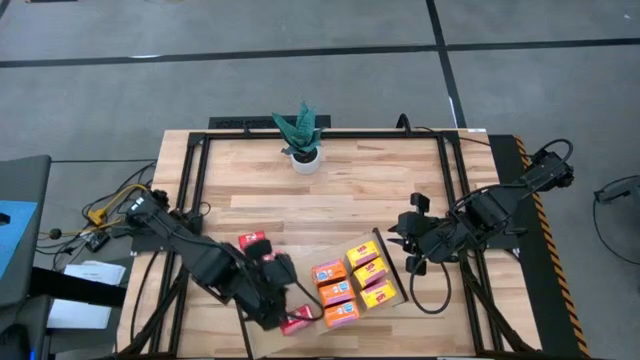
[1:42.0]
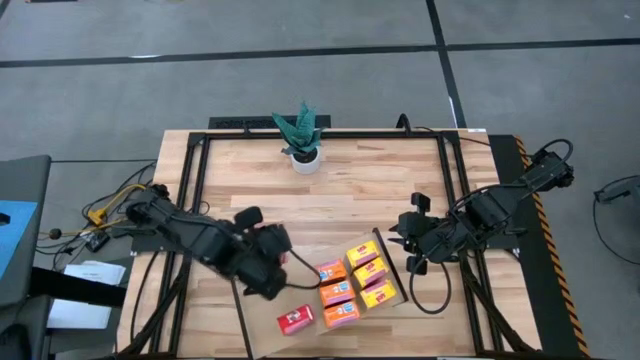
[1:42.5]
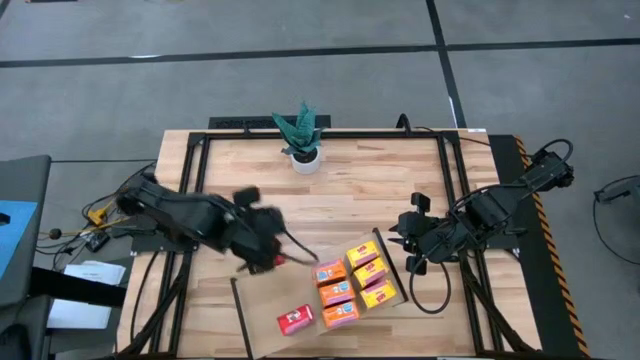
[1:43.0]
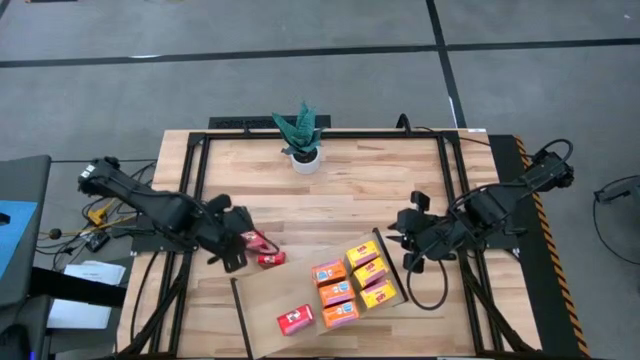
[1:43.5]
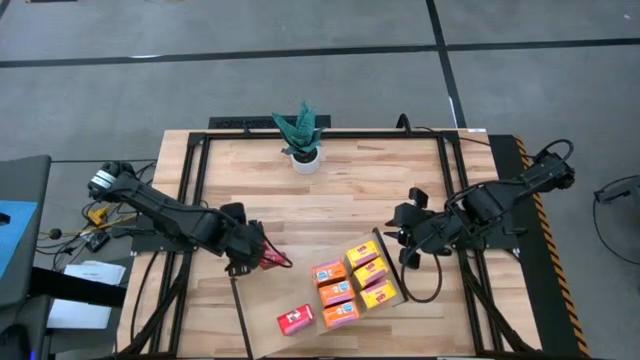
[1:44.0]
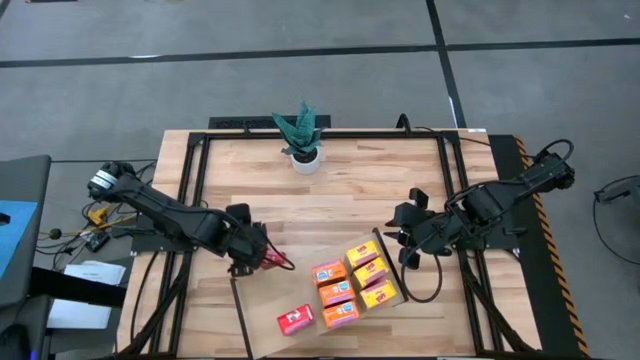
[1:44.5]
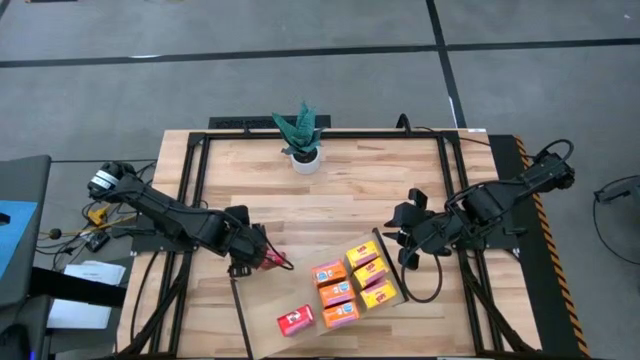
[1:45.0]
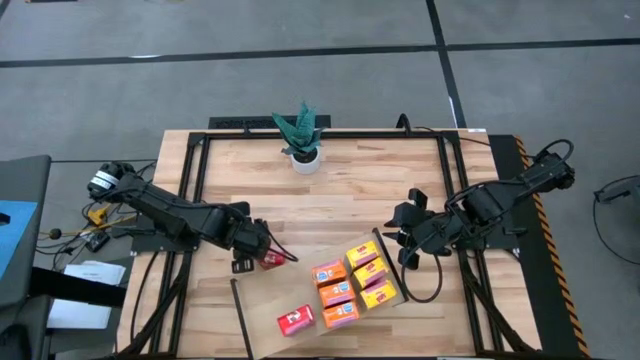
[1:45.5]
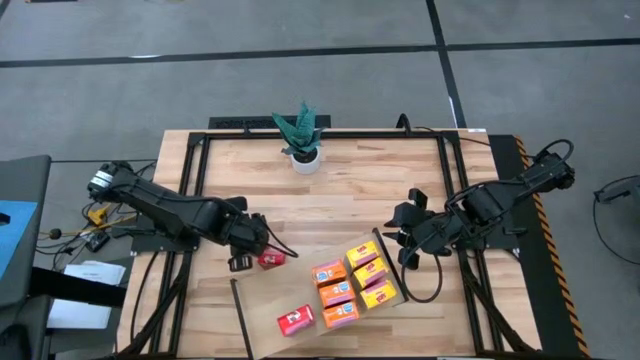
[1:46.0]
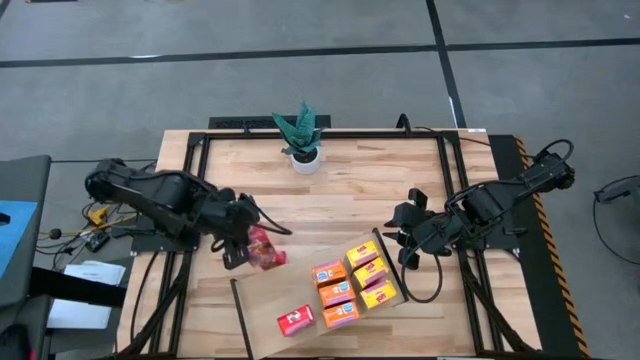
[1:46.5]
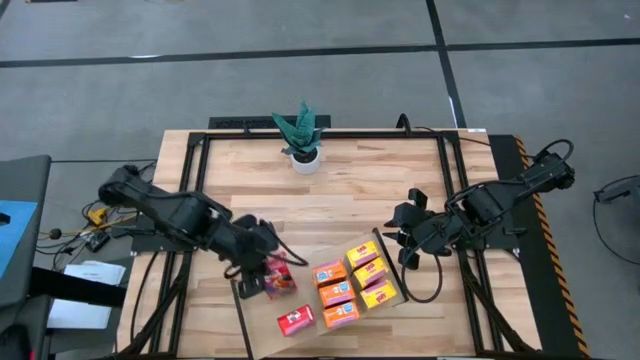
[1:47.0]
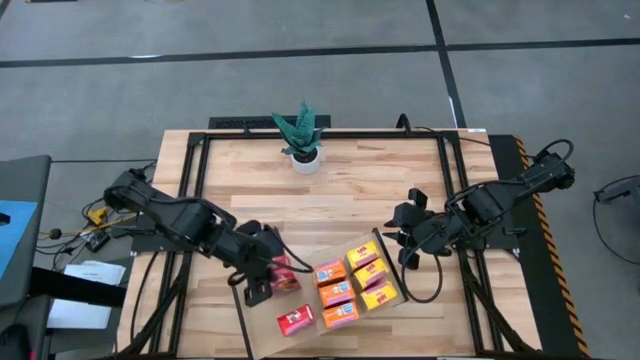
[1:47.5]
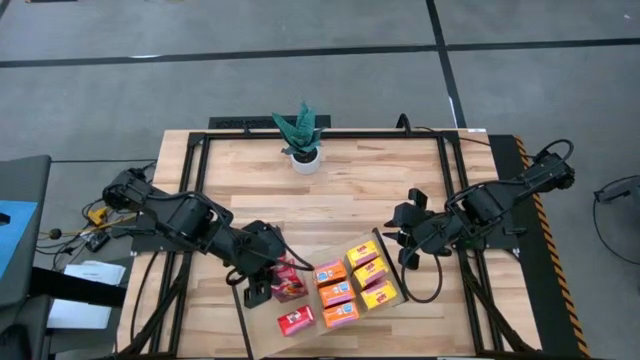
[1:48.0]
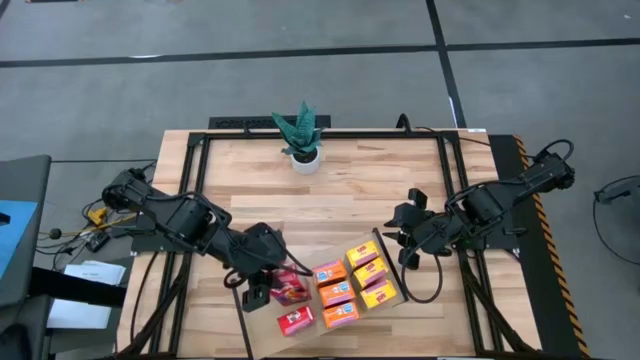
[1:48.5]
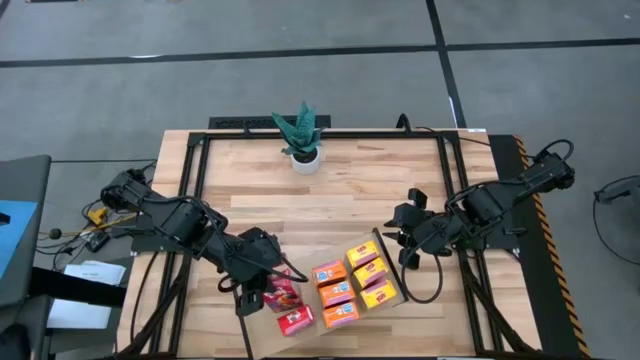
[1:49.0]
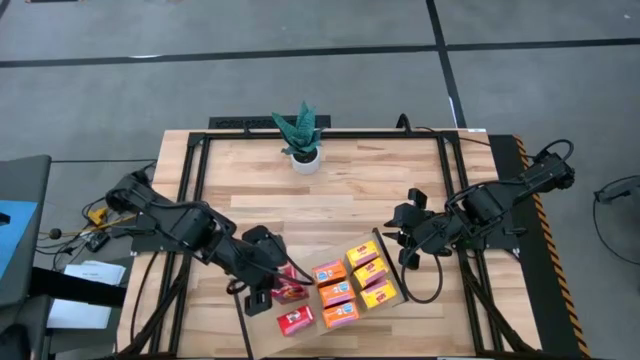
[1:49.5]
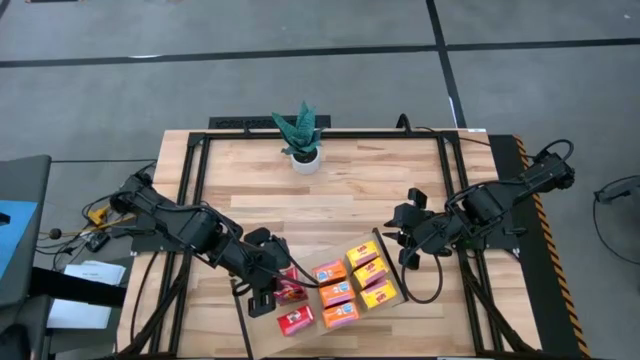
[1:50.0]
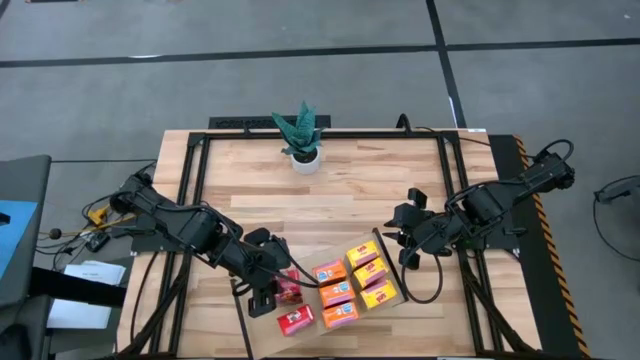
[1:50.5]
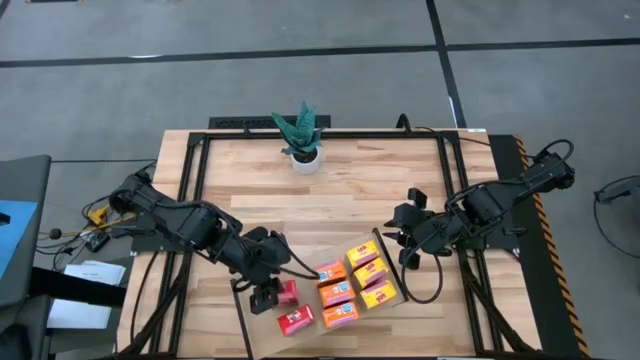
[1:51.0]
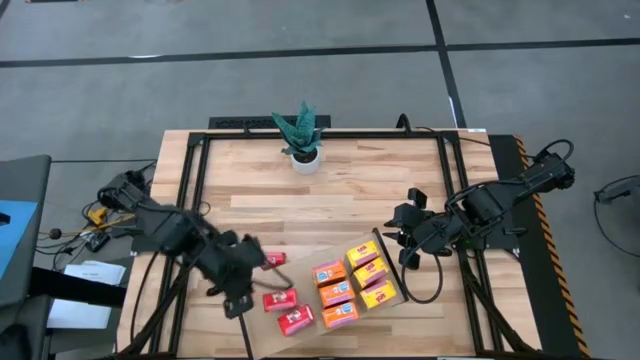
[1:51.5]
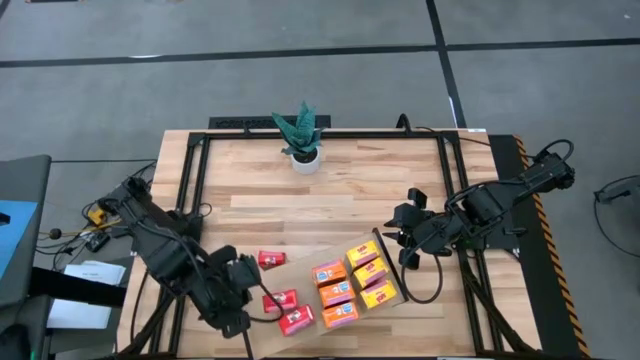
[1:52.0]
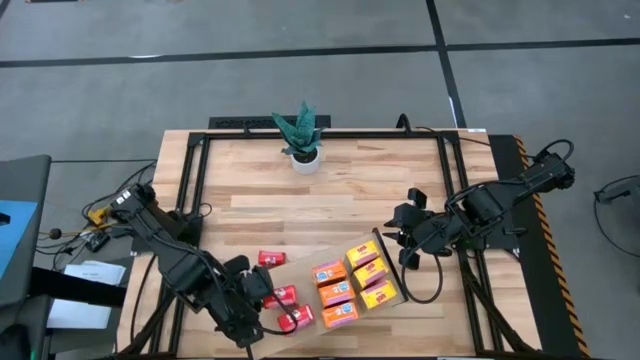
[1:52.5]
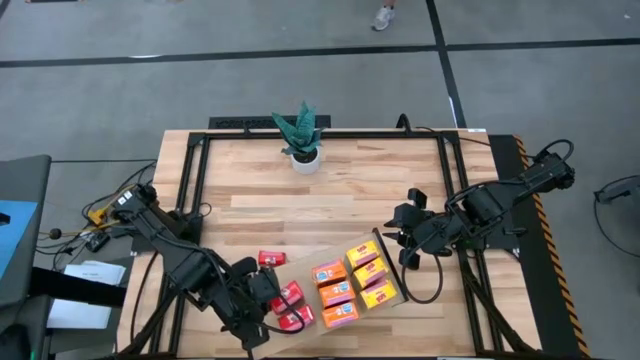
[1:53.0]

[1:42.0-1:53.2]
Task: Stack cereal on shelf
Put the left red cereal box on the shelf aligned with the red cereal box

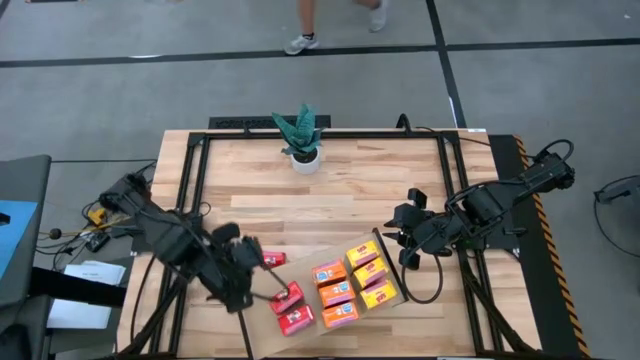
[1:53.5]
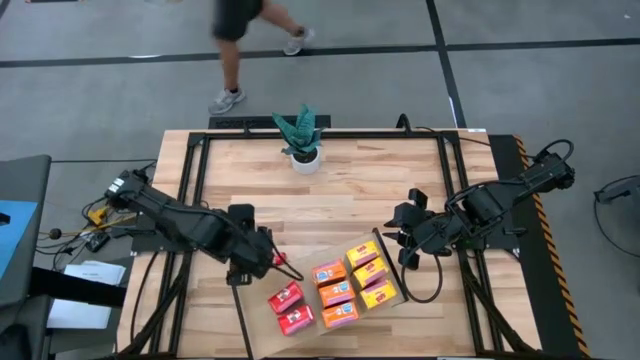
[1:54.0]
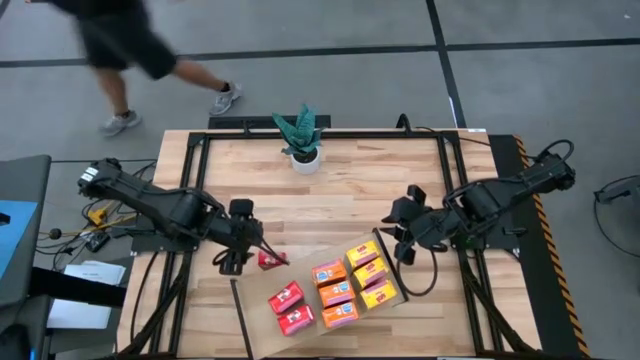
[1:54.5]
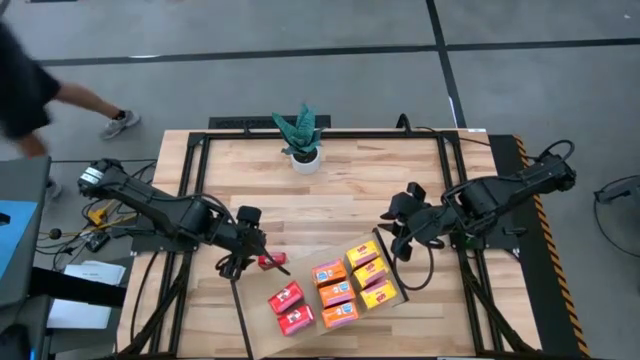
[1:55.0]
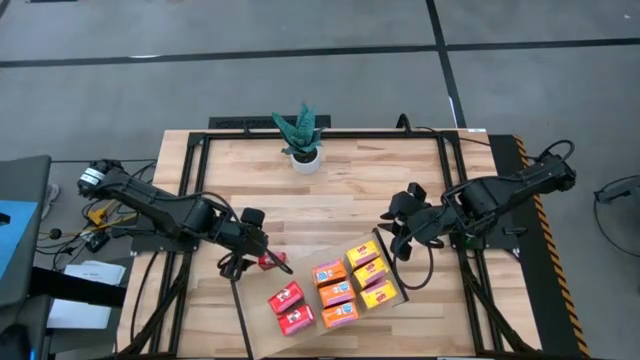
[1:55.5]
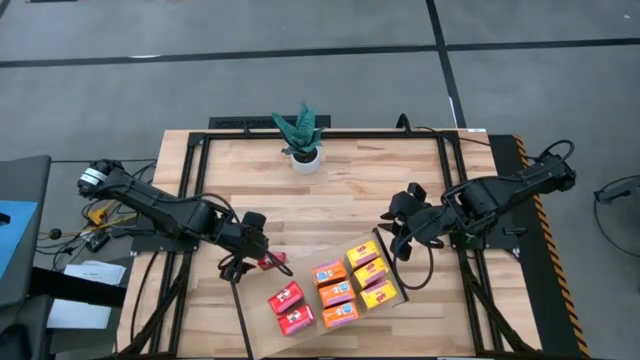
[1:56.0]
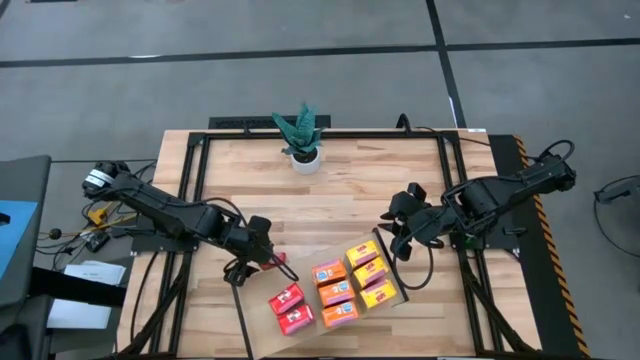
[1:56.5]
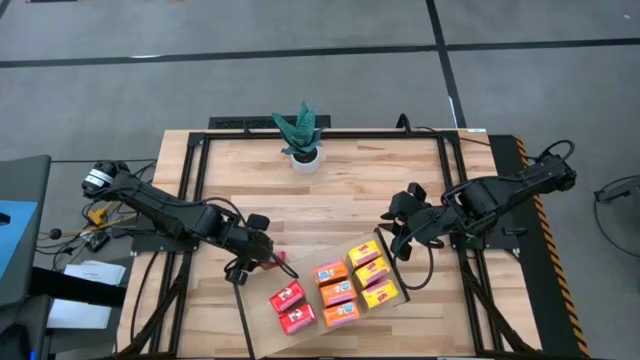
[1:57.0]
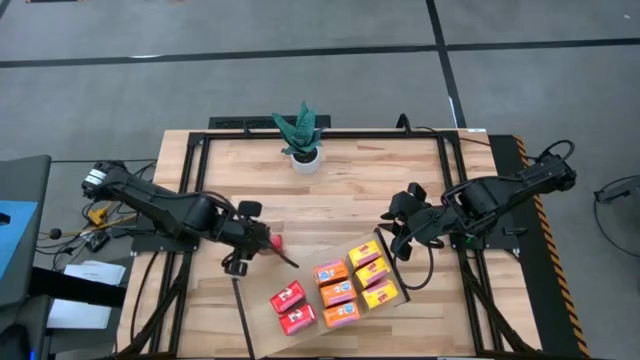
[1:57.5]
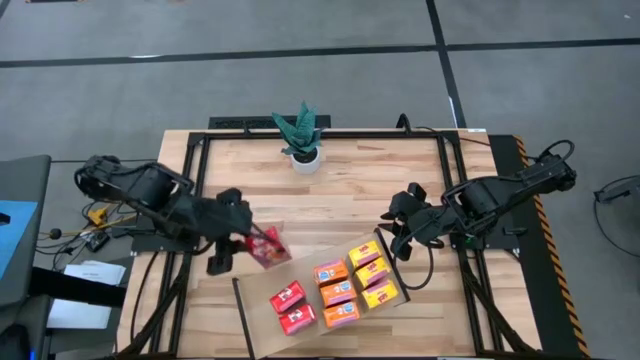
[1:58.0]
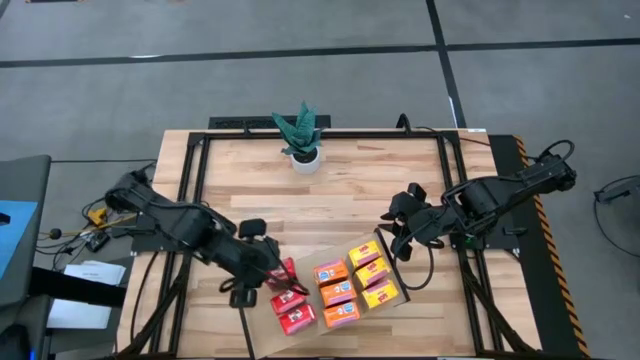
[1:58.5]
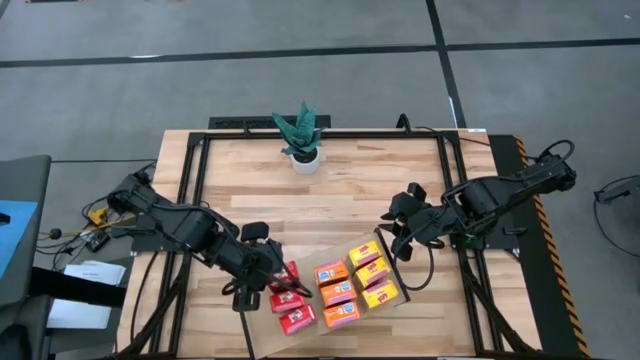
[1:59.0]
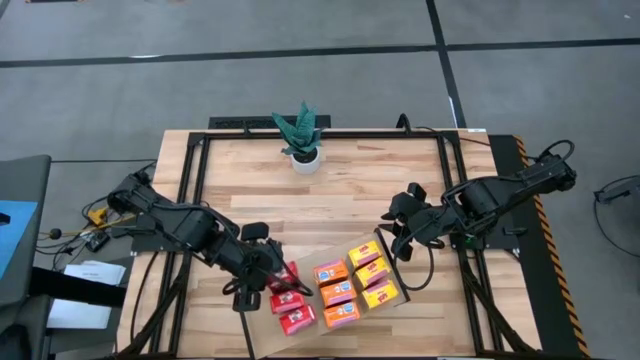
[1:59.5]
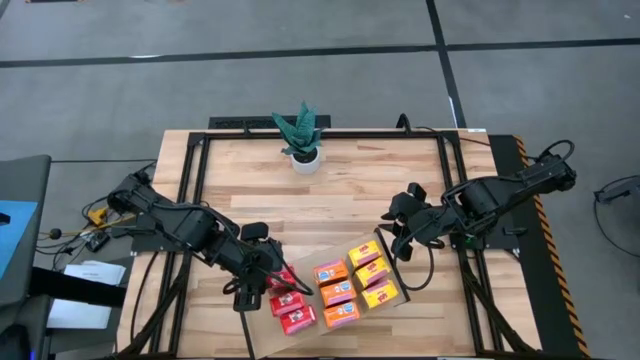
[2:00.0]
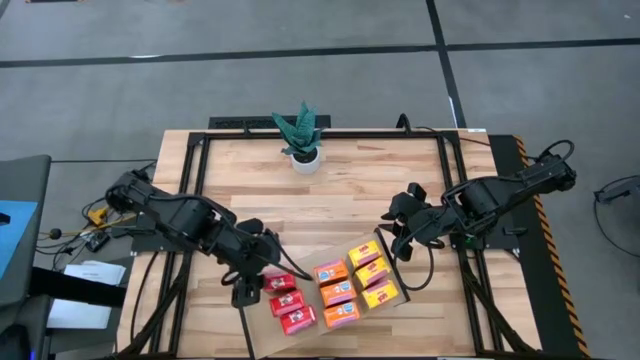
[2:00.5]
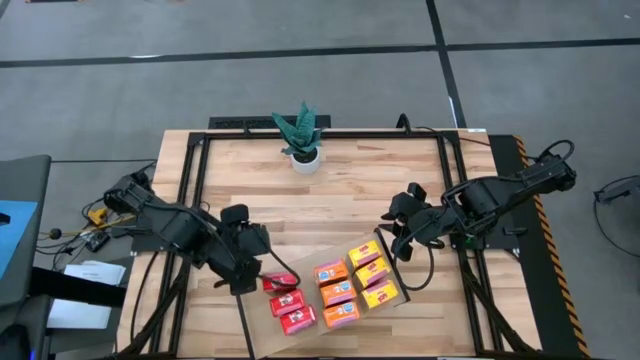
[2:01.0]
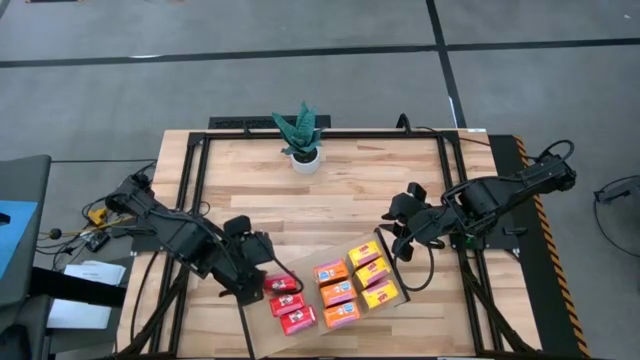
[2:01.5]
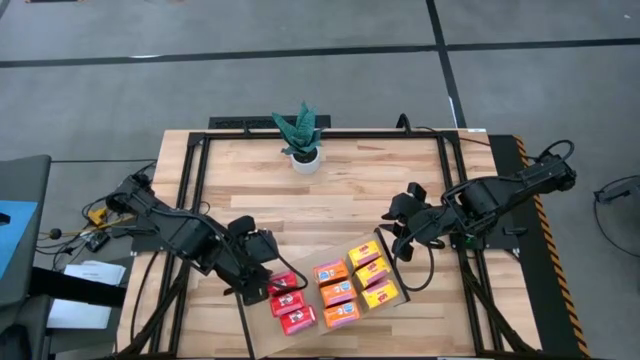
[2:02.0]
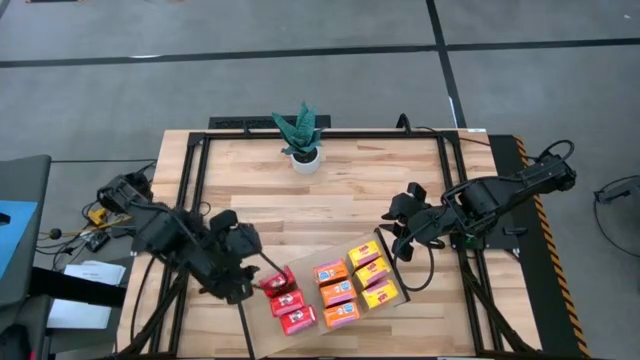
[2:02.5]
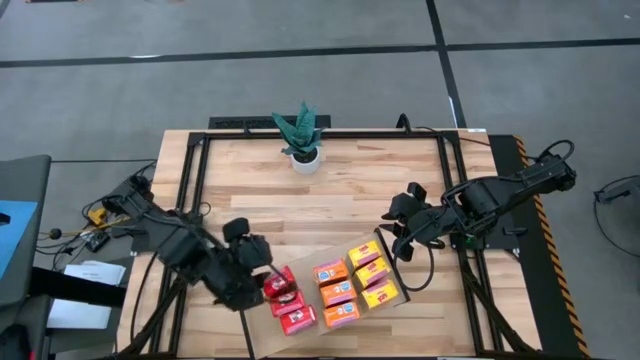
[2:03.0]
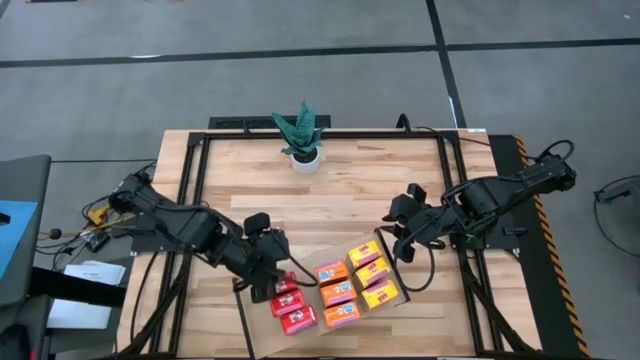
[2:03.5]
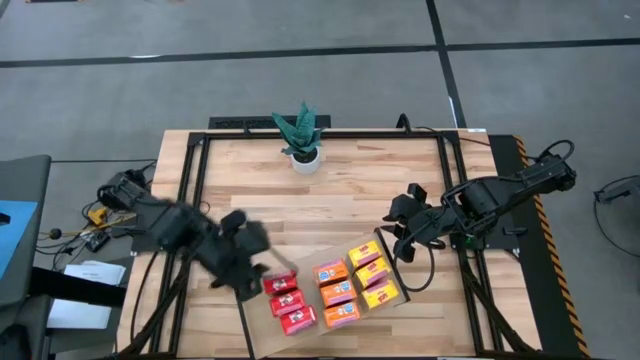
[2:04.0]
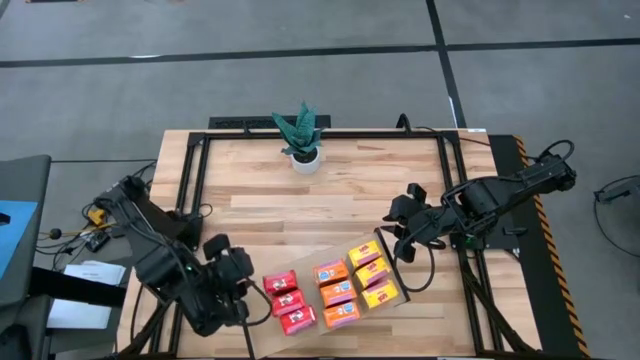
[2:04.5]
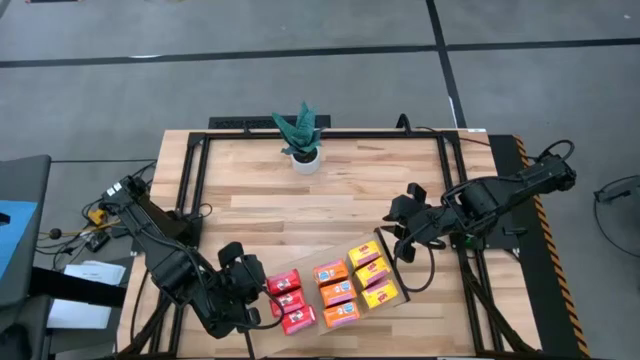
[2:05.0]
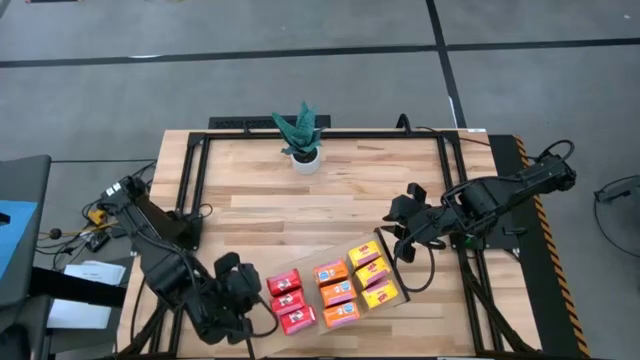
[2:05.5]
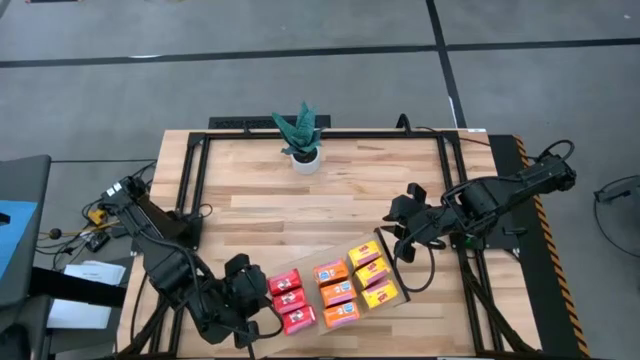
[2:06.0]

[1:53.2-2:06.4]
Put the red cereal box on the shelf aligned with the red cereal boxes
